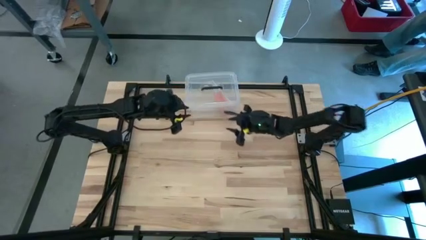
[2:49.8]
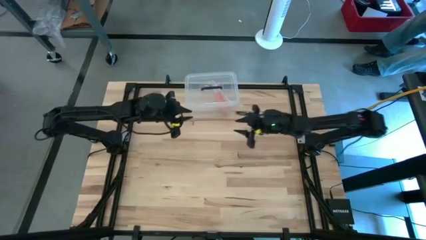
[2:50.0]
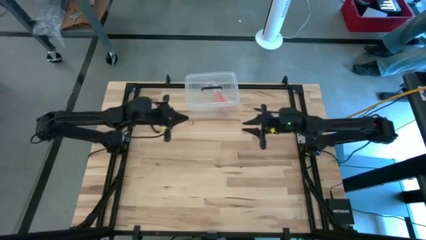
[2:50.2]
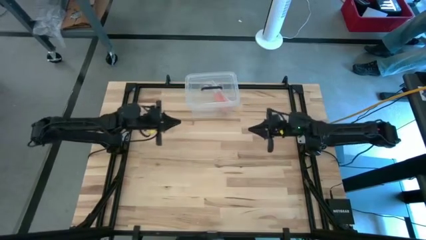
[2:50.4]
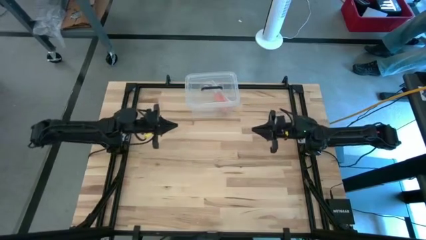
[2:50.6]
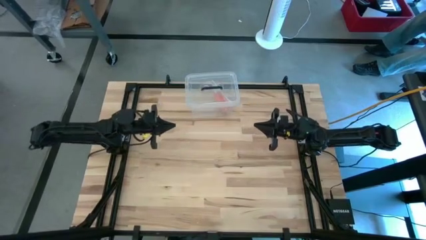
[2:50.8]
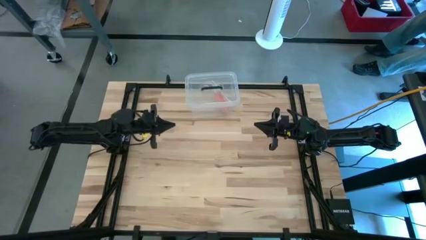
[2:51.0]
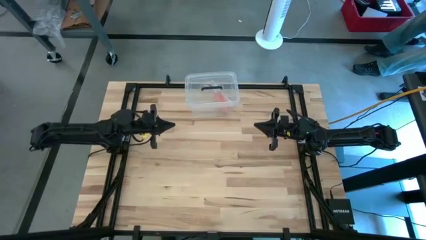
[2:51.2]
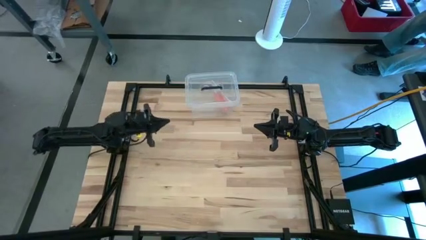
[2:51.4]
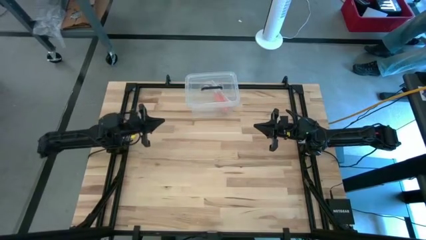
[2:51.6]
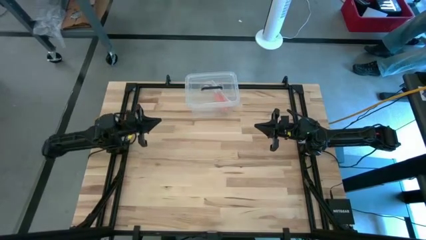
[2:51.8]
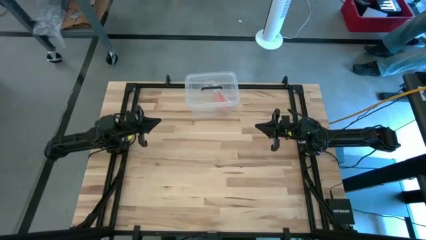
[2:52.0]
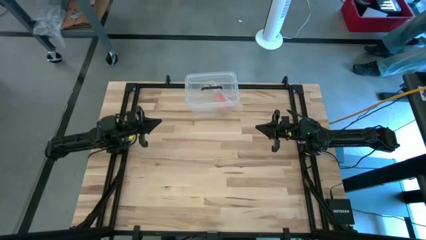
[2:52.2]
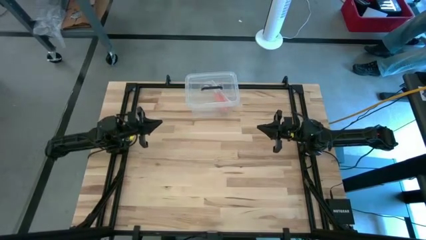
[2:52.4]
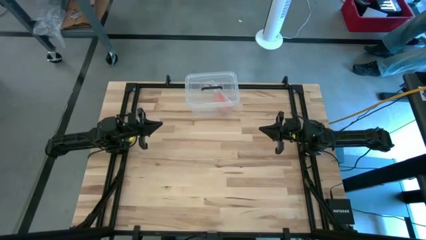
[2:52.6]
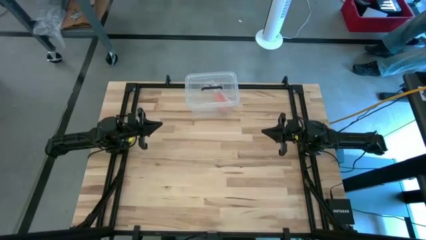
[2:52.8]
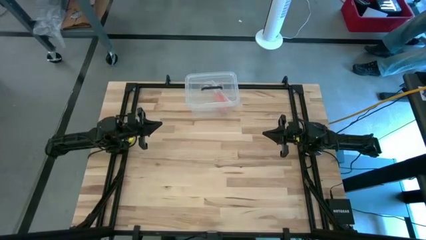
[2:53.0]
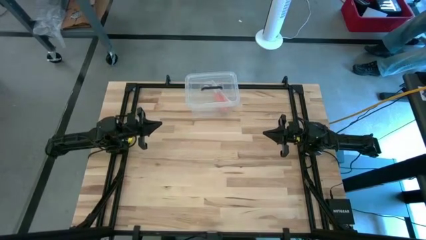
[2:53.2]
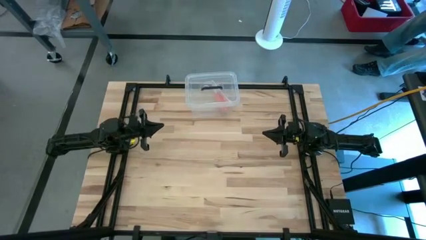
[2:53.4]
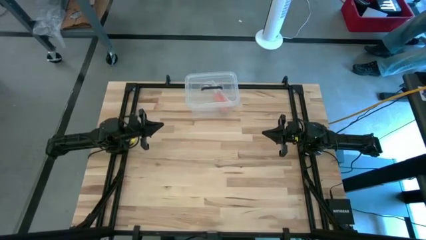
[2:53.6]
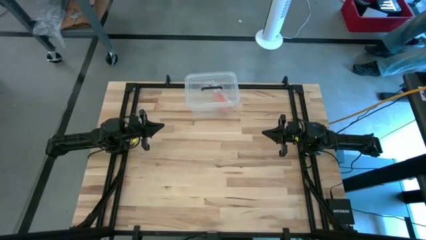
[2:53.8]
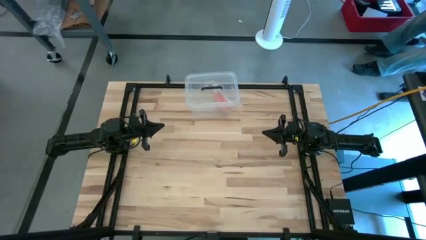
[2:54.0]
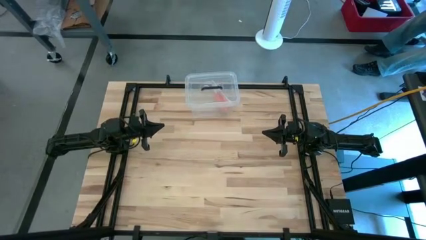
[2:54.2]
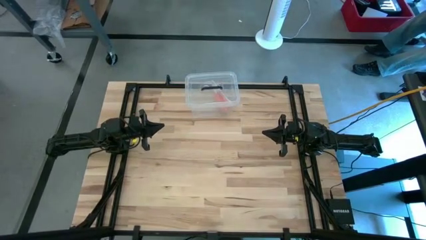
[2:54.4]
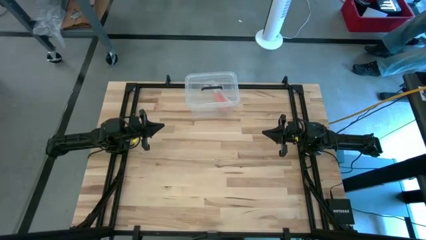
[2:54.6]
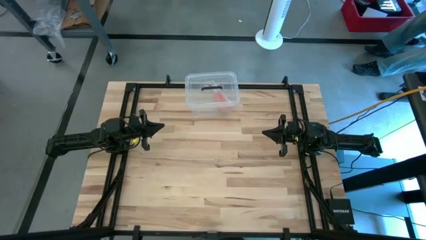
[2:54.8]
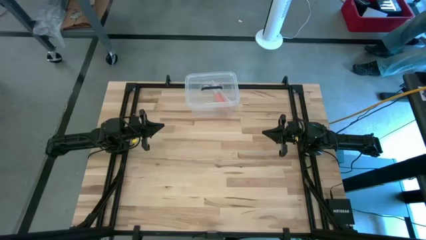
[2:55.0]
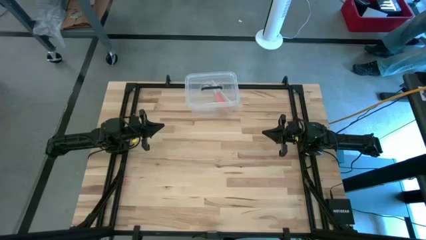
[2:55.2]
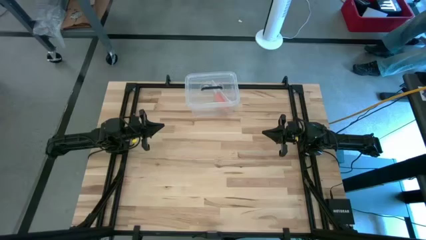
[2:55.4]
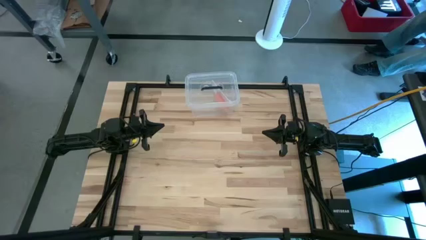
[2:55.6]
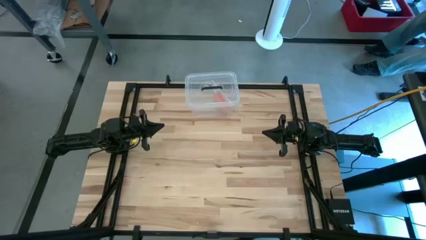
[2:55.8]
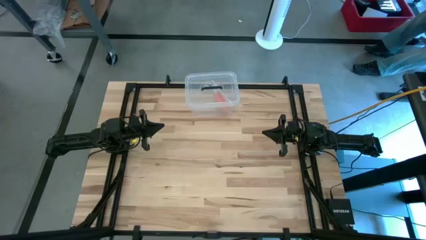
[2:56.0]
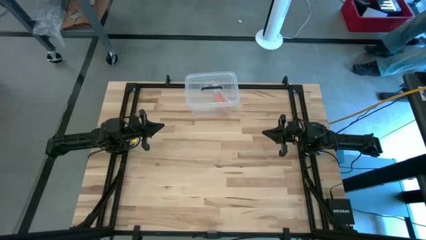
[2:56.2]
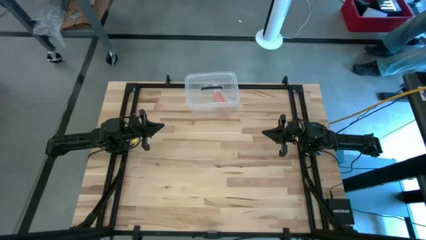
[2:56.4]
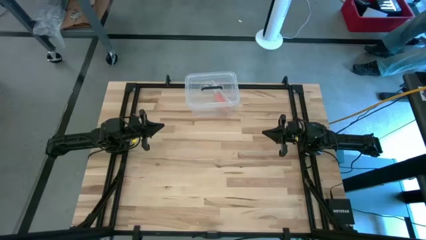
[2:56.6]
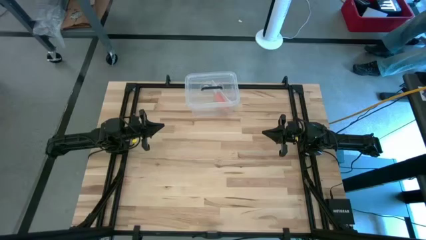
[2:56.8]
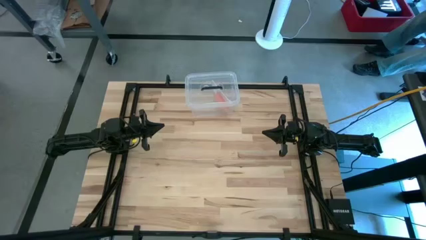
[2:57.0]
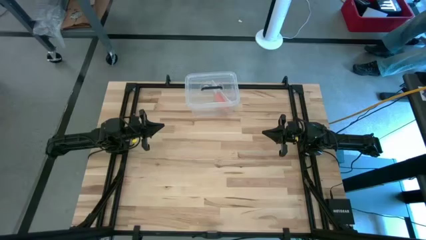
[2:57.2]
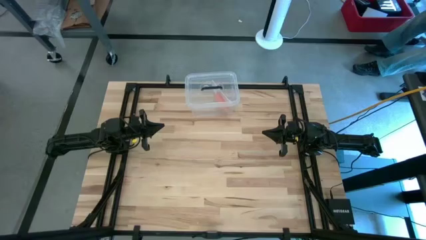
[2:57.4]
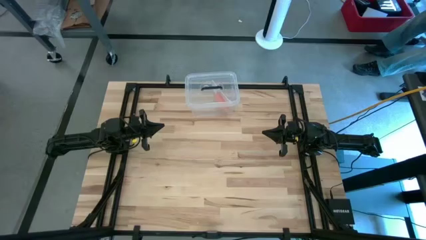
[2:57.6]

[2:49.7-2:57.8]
Task: Roll bandage
Return to Home Position

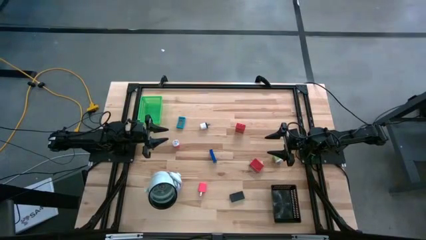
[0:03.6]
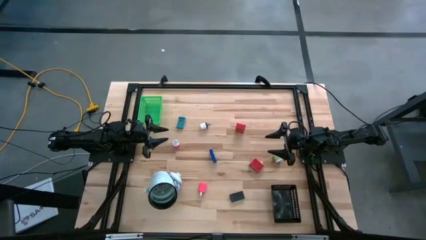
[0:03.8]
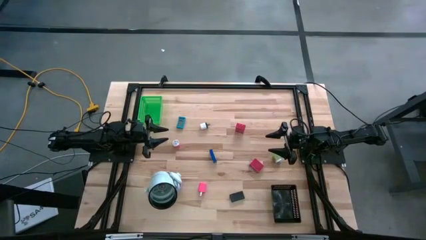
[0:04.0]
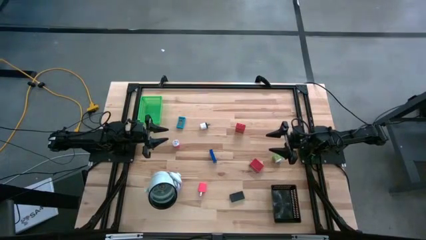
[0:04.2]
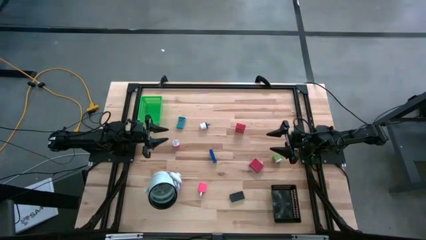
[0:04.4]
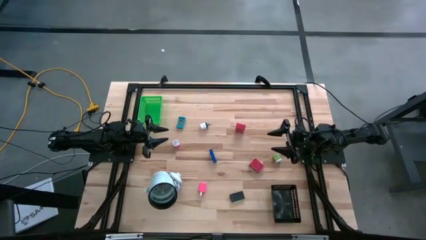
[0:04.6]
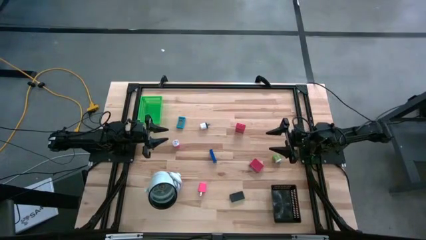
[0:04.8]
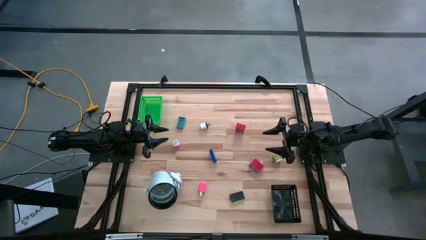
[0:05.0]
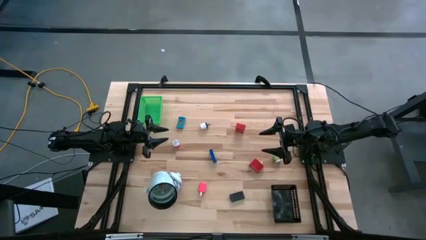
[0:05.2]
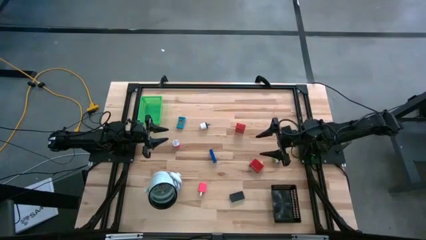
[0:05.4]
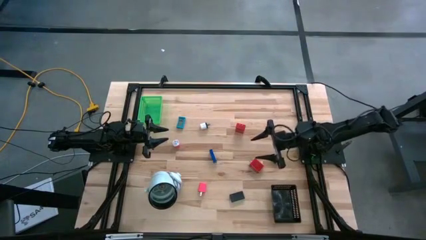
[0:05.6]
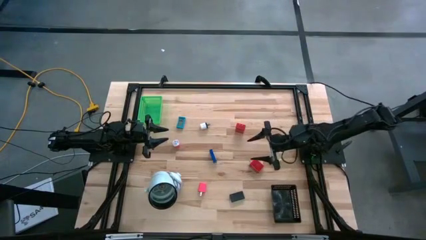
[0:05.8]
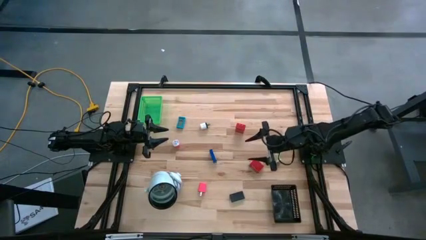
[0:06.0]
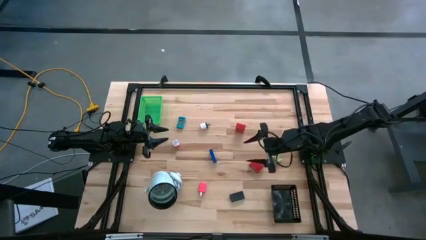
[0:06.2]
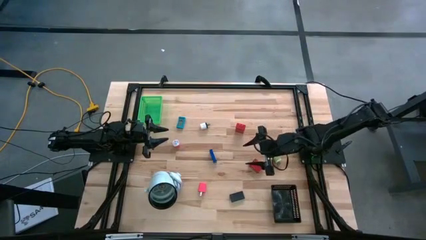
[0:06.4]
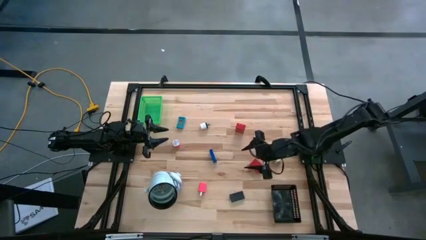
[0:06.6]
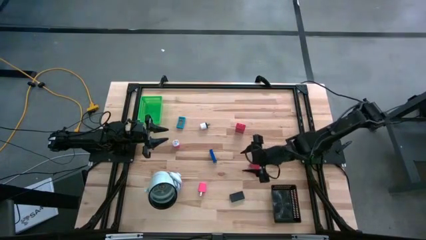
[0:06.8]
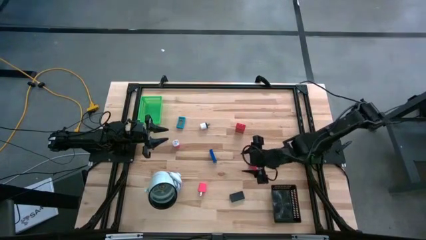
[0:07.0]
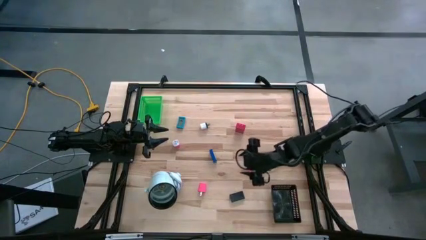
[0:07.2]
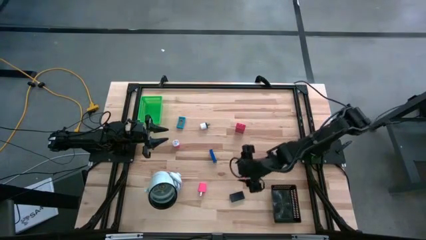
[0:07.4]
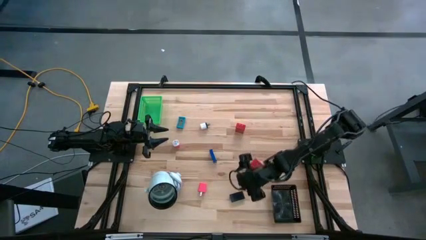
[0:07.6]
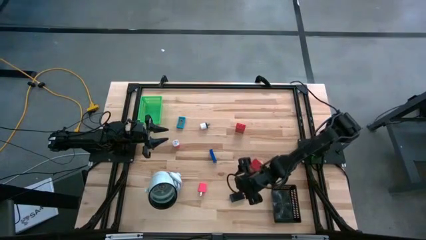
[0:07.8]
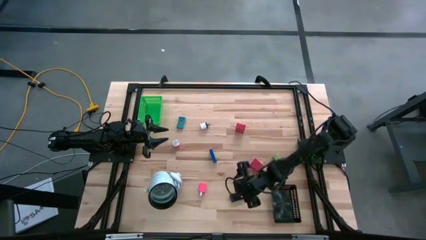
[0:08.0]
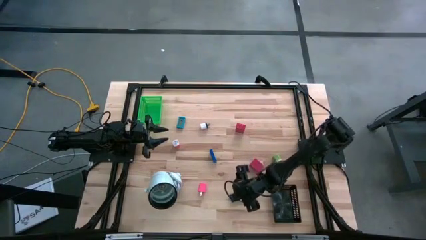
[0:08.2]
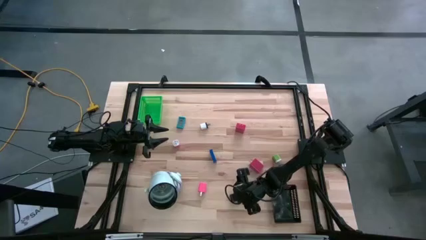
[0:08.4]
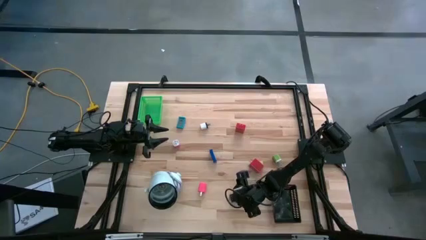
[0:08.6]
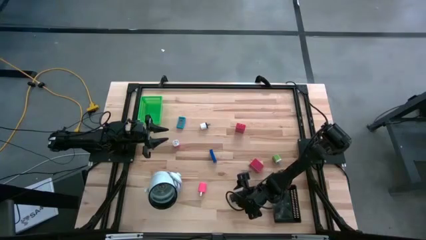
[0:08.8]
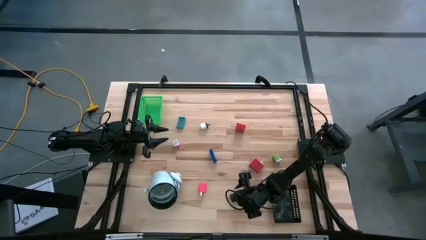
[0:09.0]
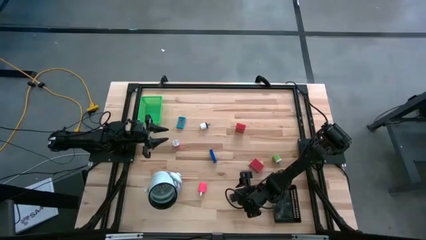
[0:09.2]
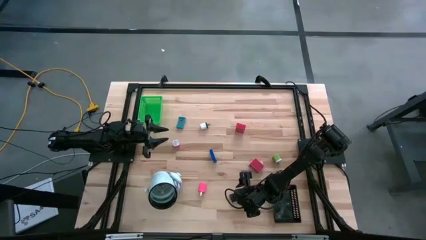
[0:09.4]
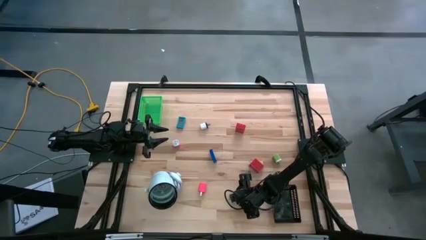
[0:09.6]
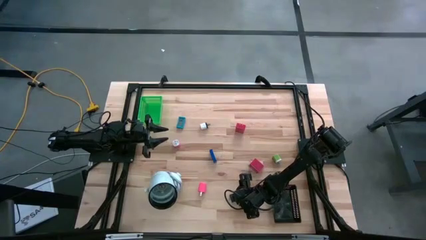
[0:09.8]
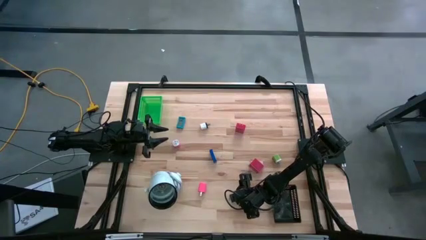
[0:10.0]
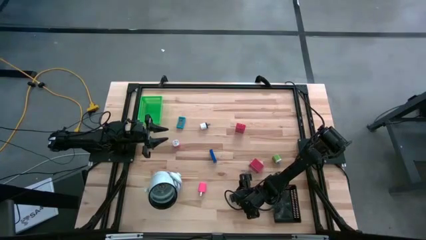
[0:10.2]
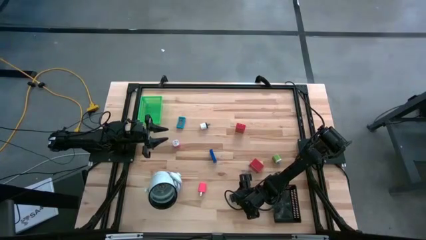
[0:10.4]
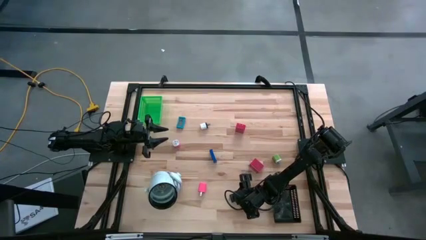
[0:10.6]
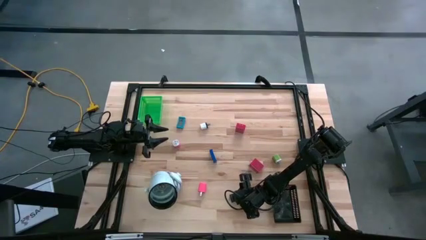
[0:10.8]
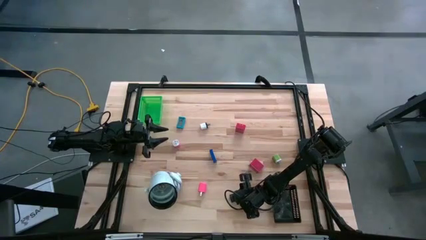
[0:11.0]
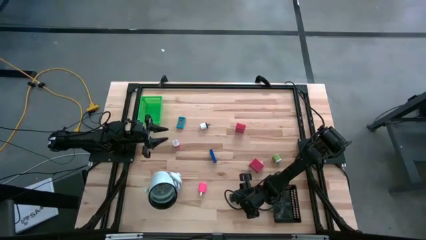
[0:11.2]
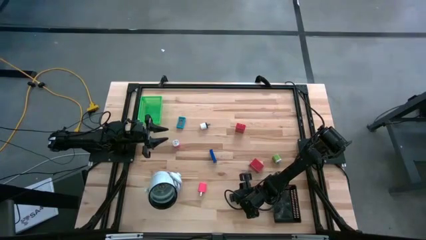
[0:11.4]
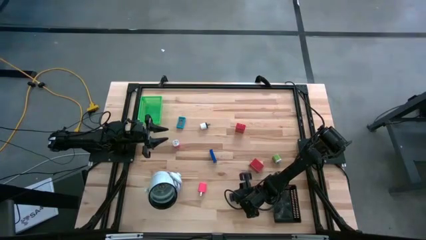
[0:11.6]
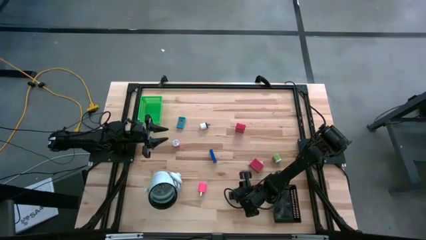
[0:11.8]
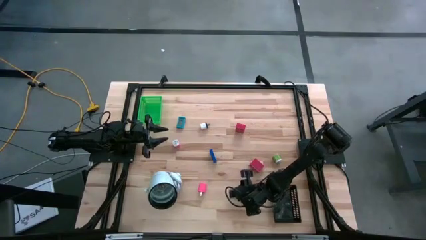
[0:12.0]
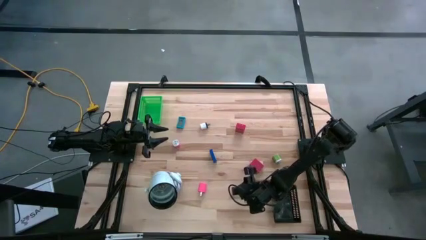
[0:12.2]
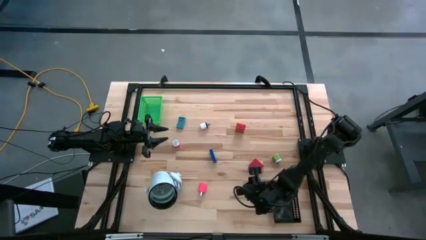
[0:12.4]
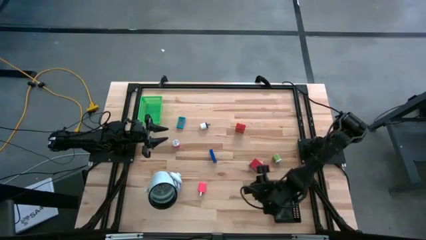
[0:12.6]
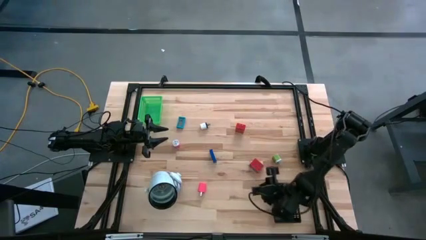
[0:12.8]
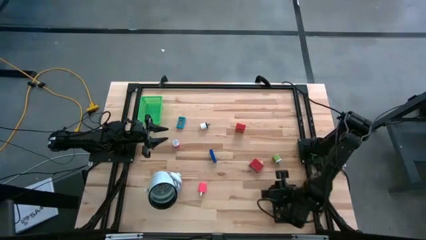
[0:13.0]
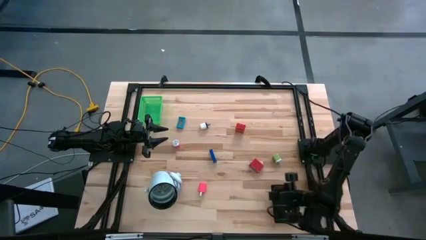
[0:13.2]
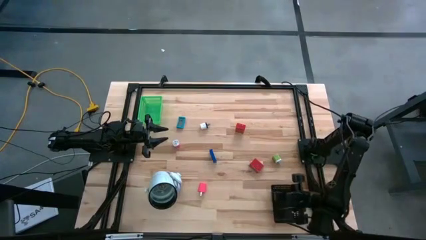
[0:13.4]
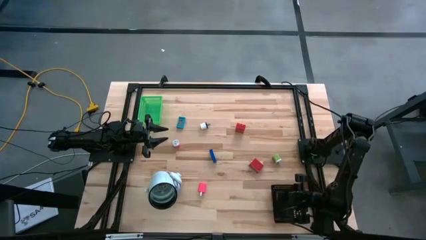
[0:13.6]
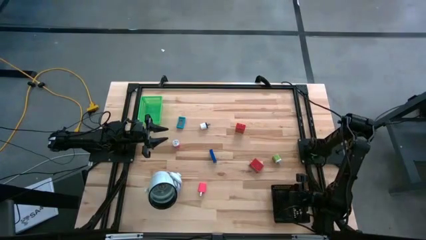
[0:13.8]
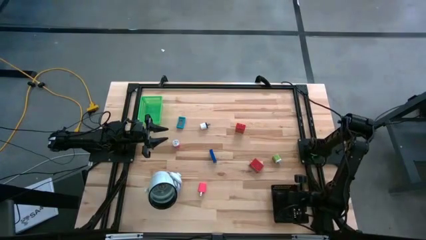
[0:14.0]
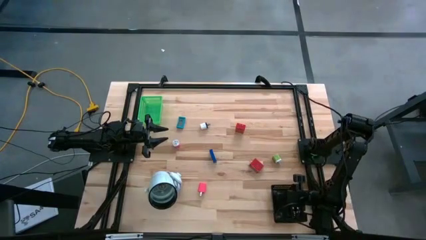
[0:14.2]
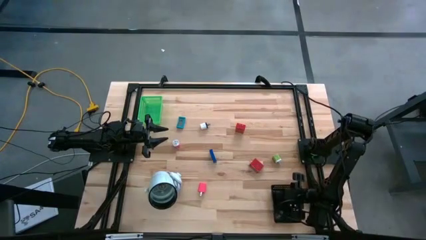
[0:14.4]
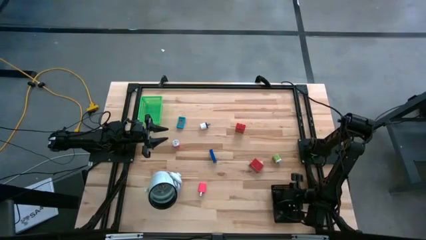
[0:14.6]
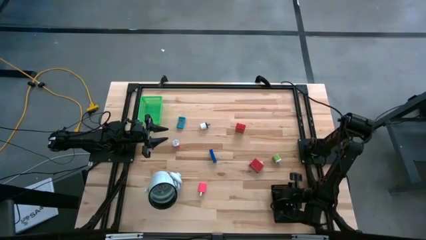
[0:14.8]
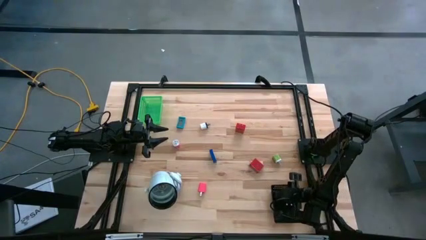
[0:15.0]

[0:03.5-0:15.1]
Task: Pick & Place Office items
Put the black digital clock into the black bin
